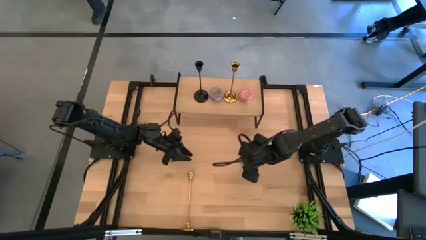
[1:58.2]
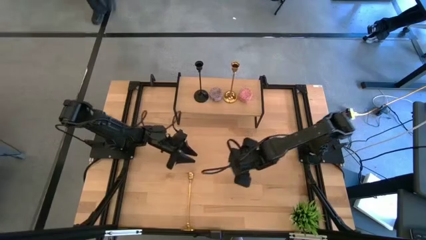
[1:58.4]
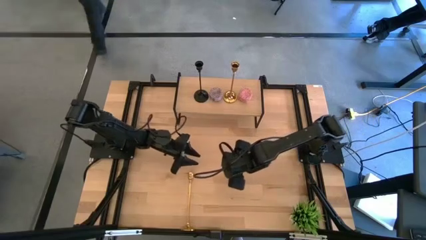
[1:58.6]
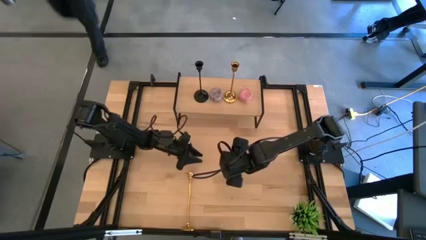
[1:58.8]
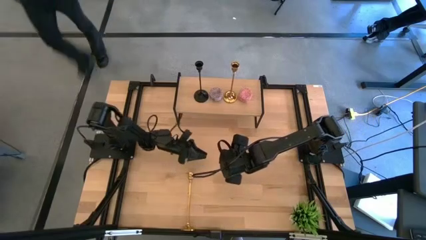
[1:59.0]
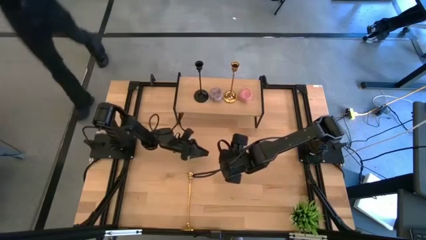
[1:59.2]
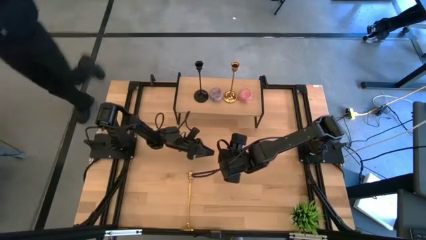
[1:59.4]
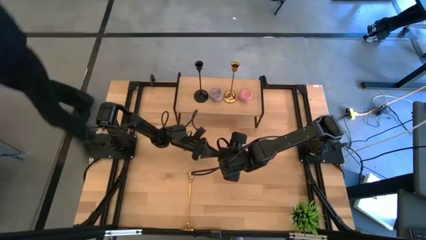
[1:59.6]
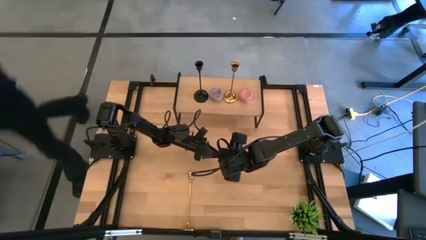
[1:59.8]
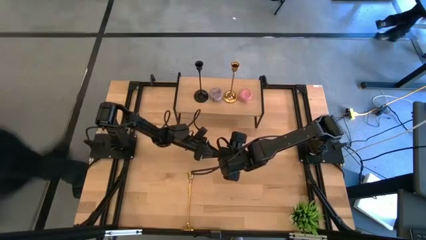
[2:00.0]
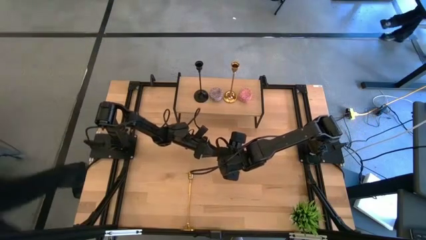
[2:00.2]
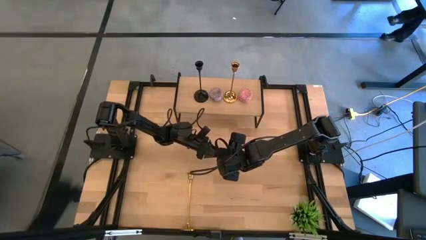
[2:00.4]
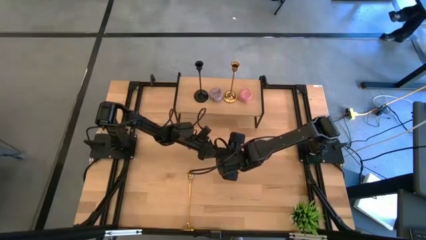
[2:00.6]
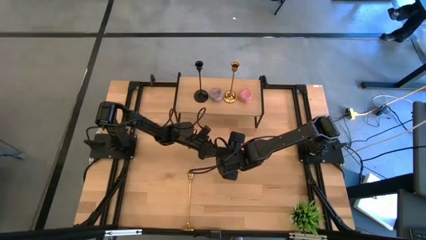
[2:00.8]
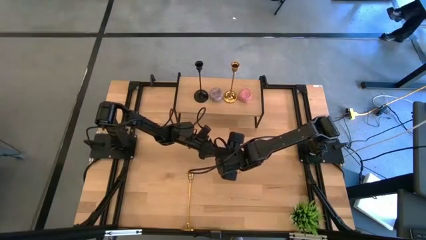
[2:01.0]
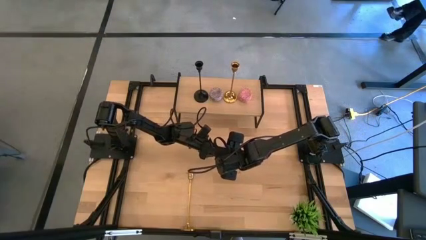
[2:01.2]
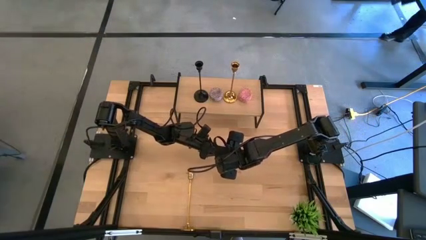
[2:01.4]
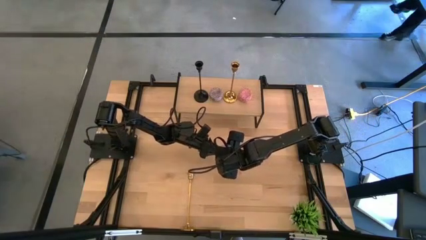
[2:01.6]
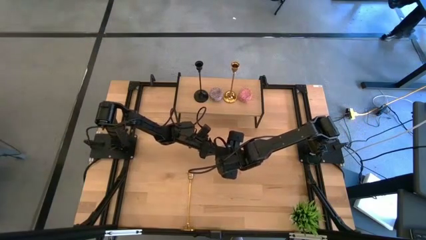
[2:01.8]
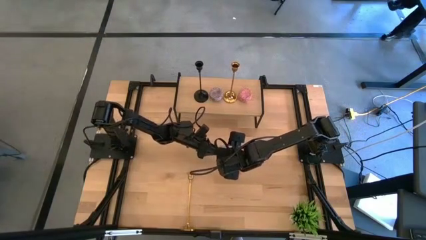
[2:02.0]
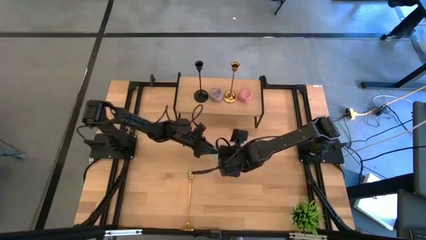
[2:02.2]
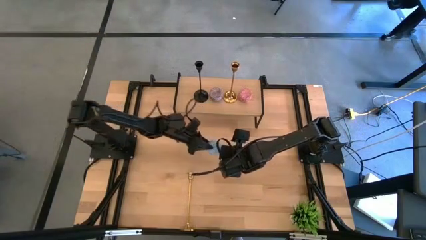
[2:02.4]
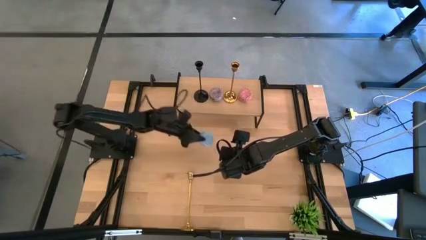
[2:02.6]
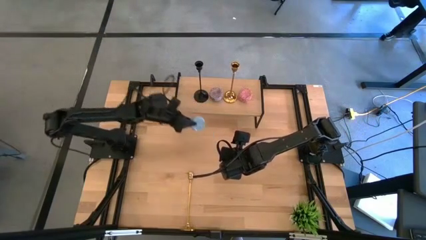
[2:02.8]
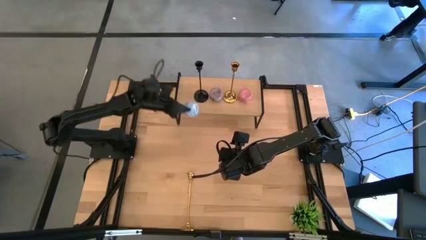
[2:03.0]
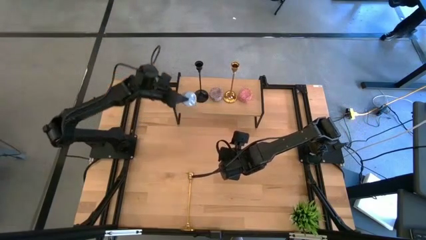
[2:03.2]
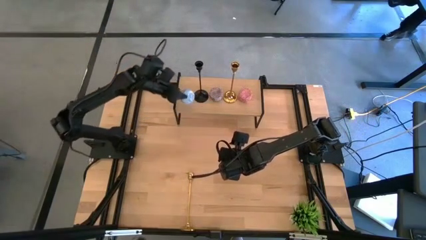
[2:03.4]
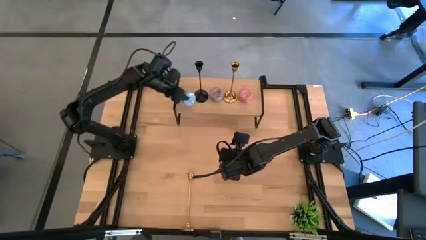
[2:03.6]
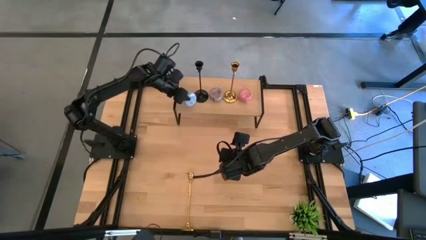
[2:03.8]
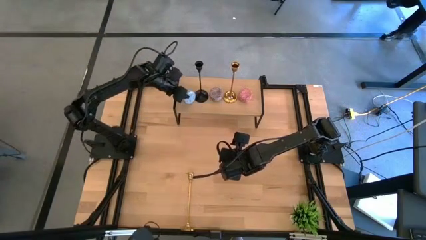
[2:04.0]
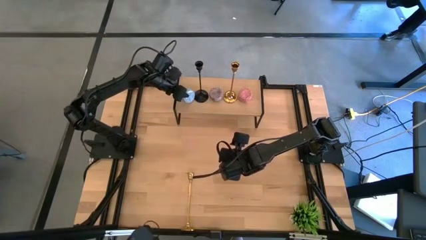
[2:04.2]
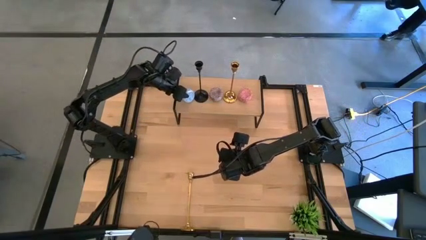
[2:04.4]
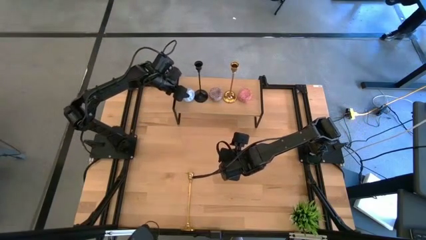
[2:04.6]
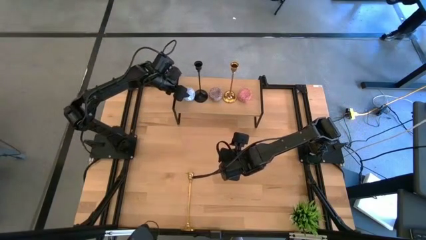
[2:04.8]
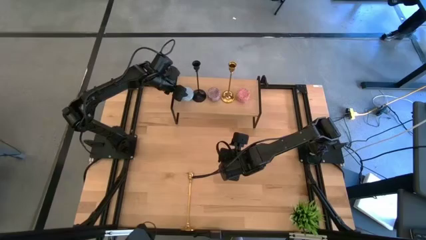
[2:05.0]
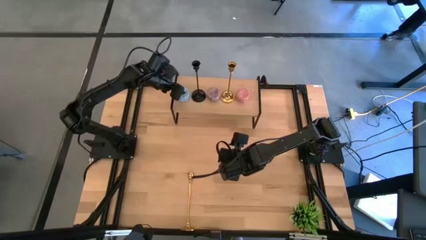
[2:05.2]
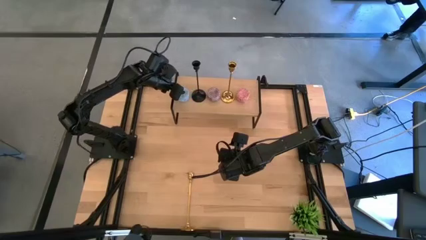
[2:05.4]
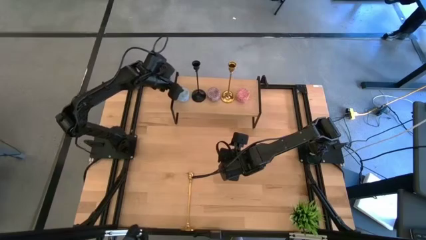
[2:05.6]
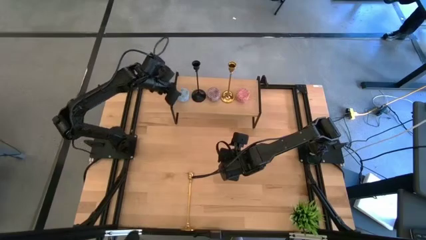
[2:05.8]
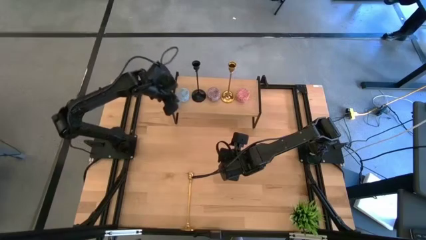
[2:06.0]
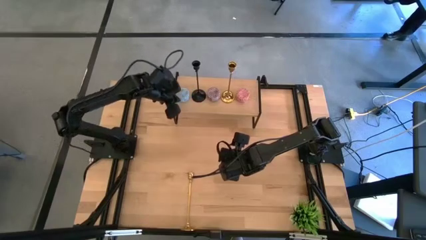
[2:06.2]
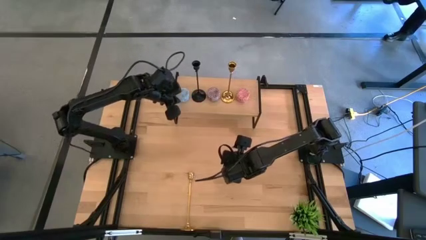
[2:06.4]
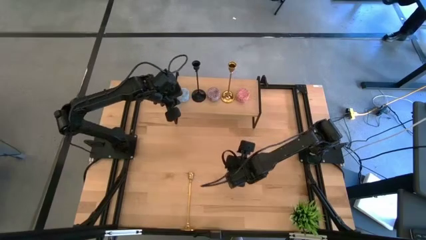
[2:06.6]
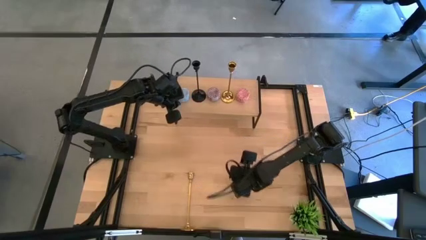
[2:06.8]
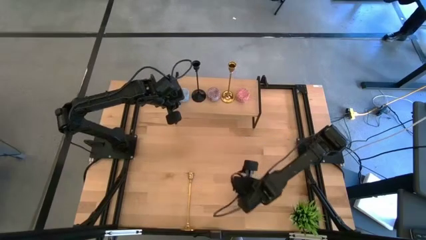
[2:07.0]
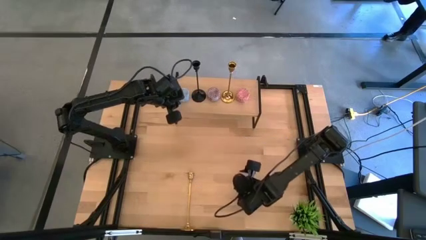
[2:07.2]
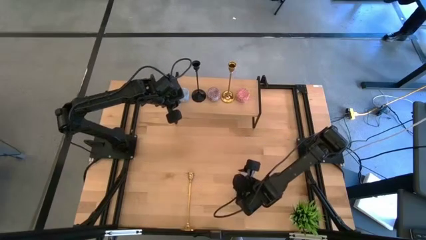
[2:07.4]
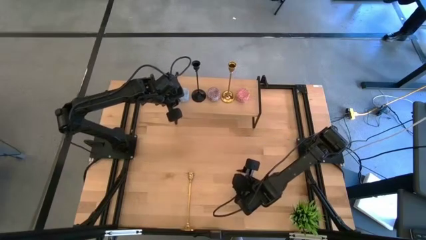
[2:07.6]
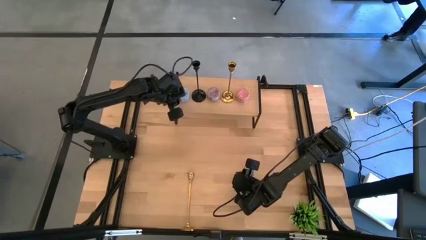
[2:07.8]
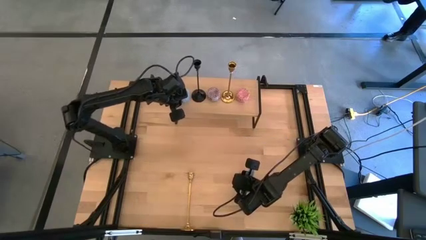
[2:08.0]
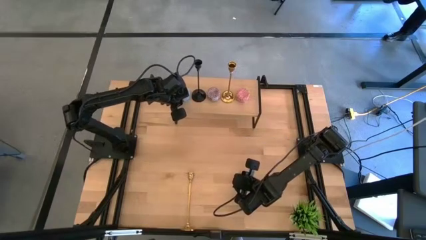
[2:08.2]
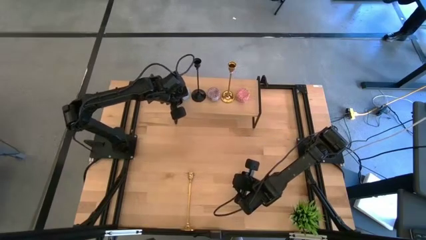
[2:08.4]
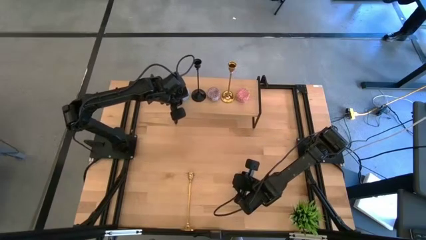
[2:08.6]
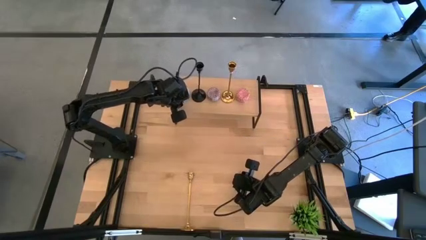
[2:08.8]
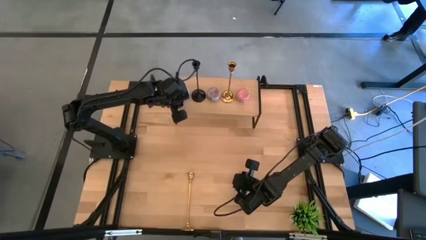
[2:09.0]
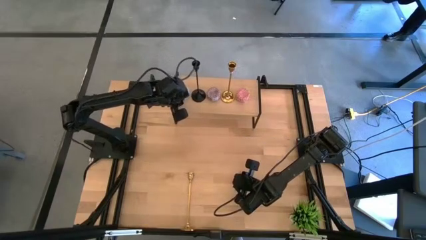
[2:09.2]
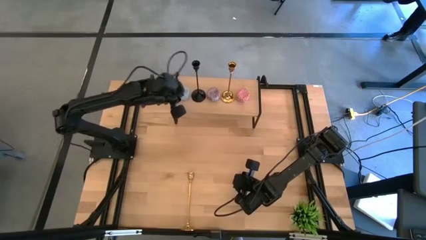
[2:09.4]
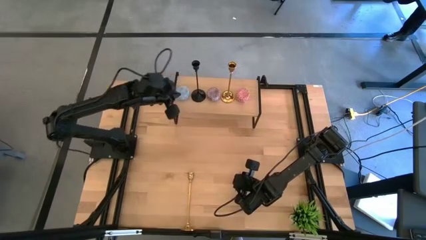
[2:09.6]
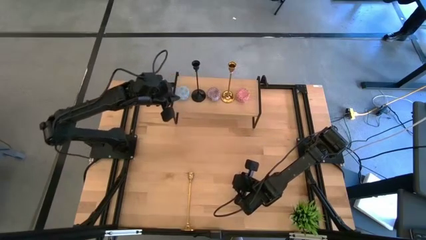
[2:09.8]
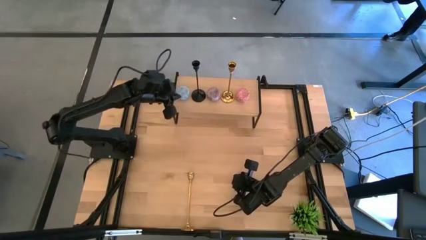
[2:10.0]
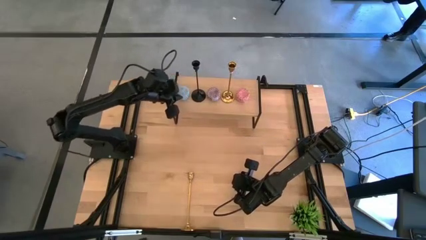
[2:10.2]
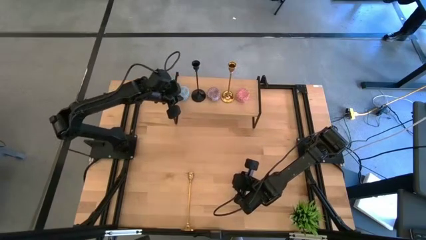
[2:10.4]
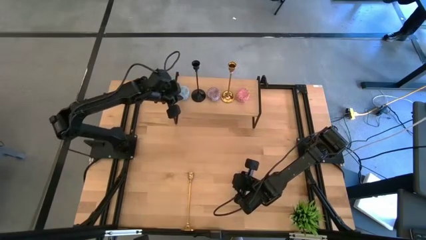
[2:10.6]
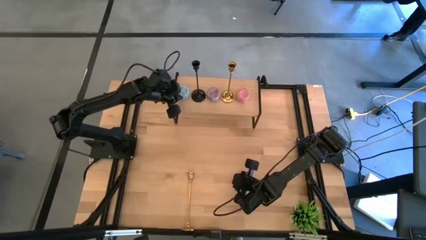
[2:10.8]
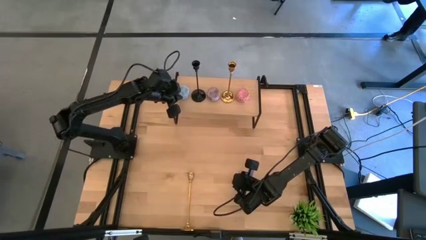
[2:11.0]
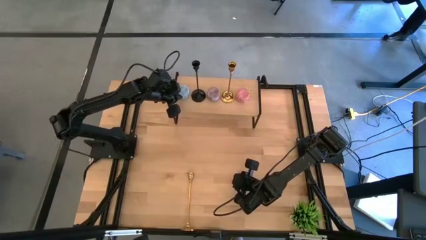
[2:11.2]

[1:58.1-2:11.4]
Task: Pick & Place candle stick holders
Put the blue scented candle on the shelf

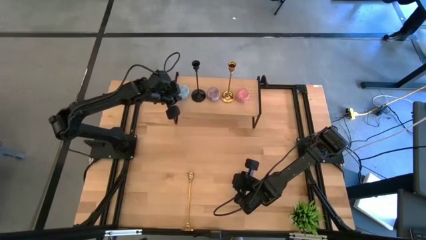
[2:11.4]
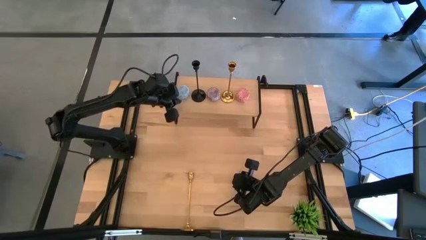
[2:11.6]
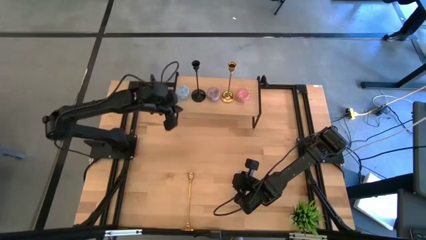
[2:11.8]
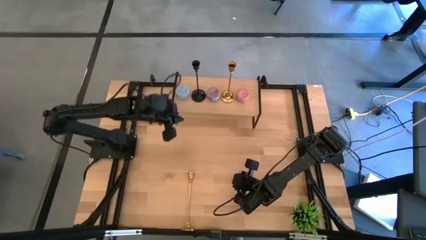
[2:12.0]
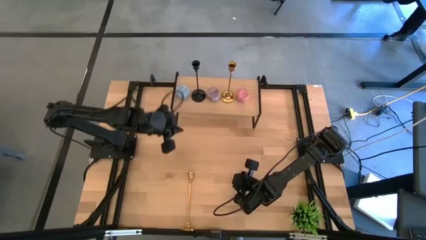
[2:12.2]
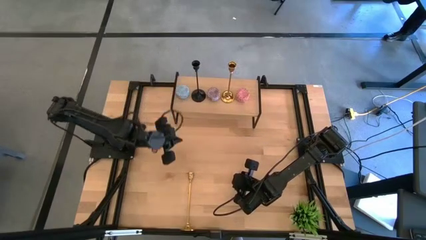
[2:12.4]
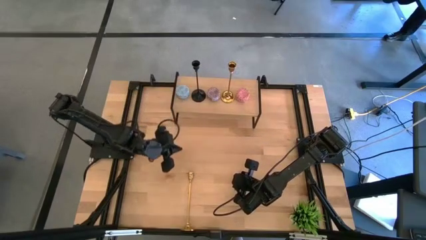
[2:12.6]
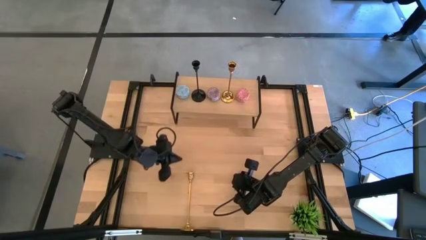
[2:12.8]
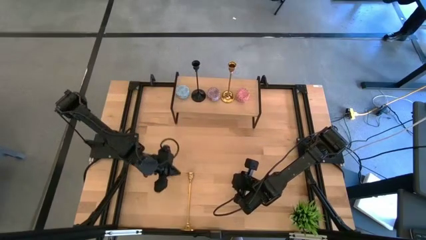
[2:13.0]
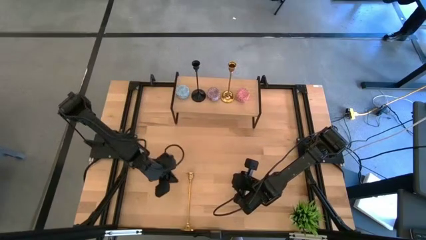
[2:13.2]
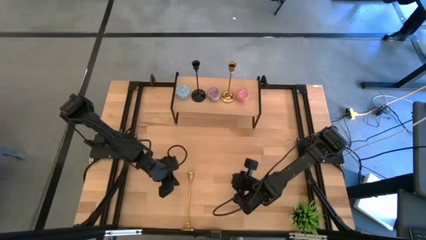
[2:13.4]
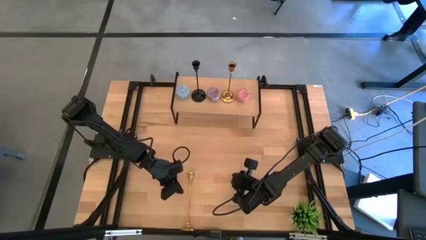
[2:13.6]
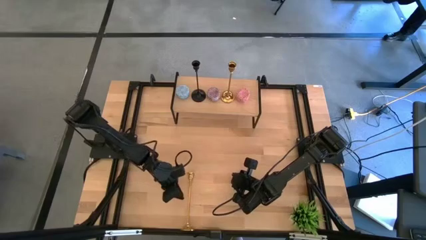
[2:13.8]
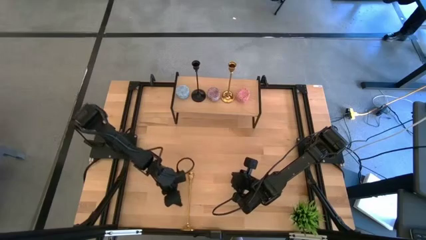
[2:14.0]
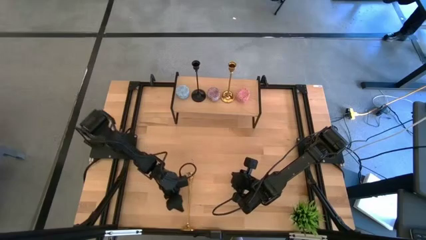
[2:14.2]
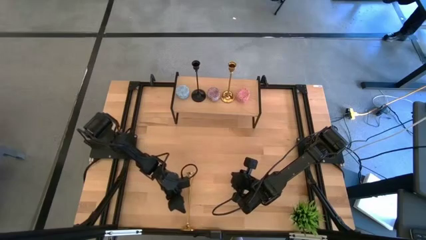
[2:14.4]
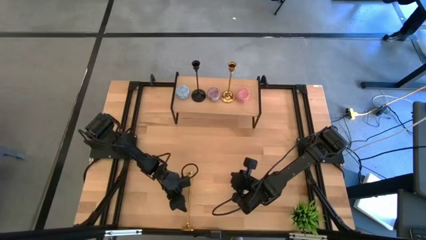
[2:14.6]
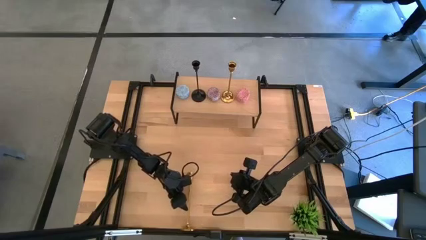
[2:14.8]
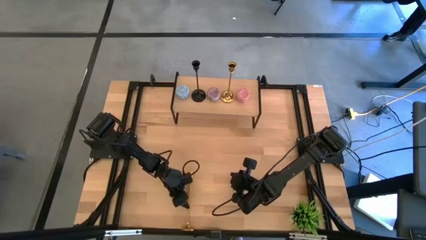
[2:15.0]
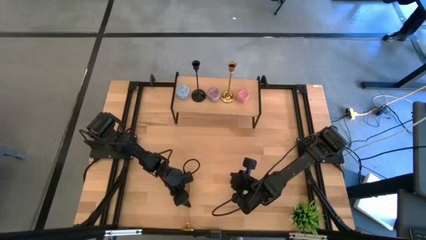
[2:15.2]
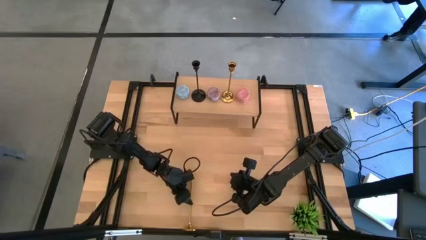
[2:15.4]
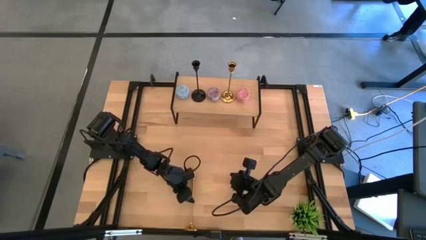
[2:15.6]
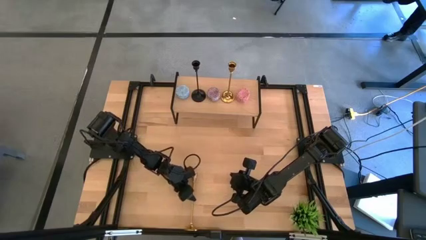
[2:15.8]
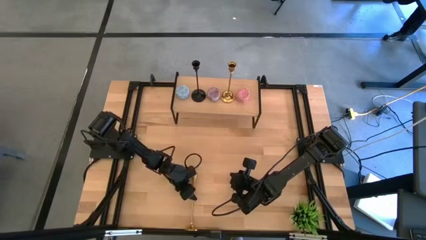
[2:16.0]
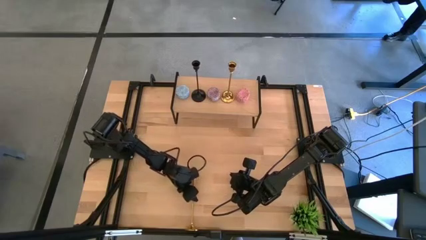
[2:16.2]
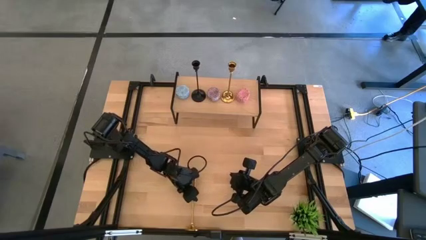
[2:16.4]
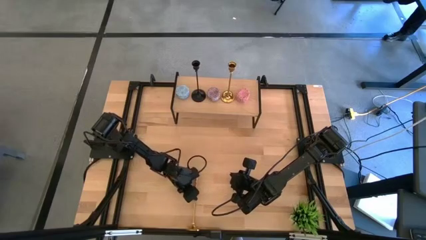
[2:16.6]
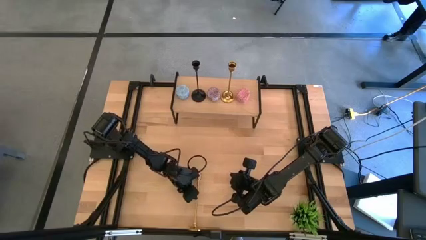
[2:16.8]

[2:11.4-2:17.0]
Put the gold candle holder on the shelf
